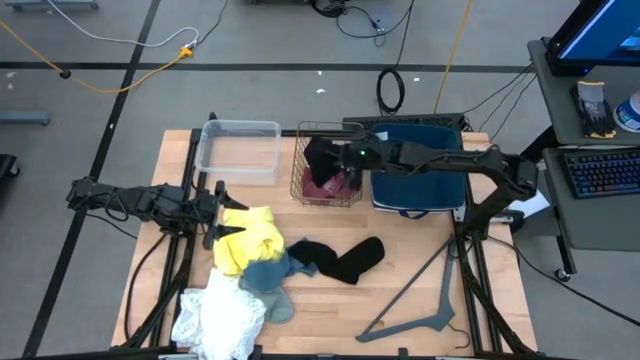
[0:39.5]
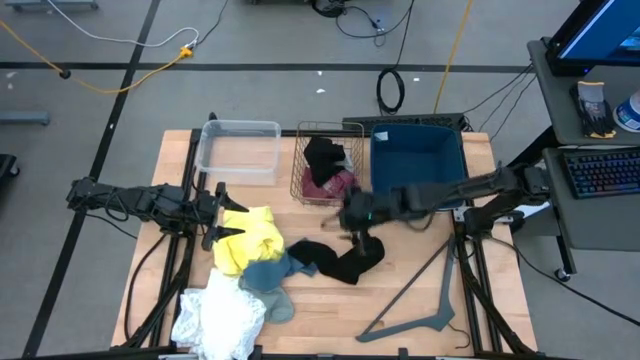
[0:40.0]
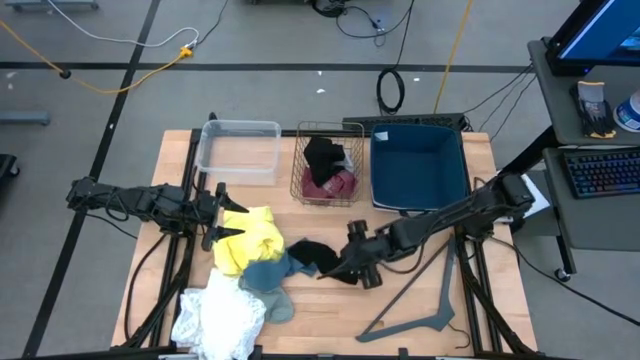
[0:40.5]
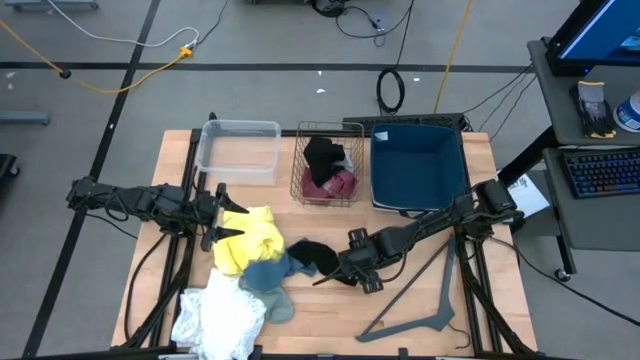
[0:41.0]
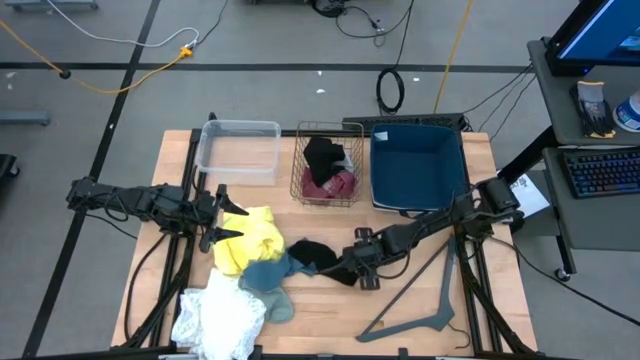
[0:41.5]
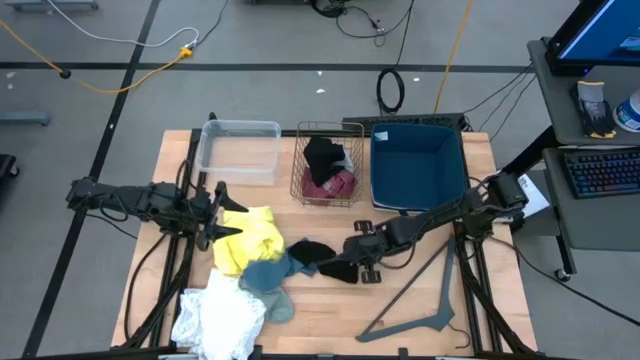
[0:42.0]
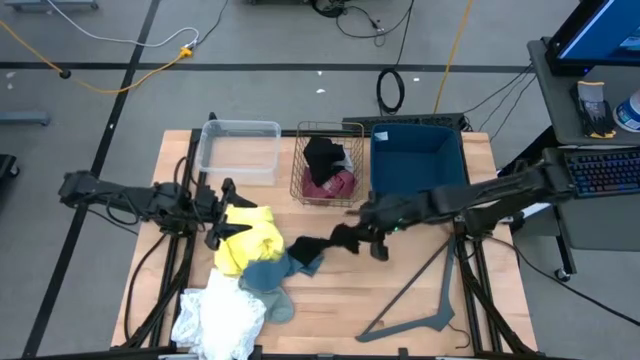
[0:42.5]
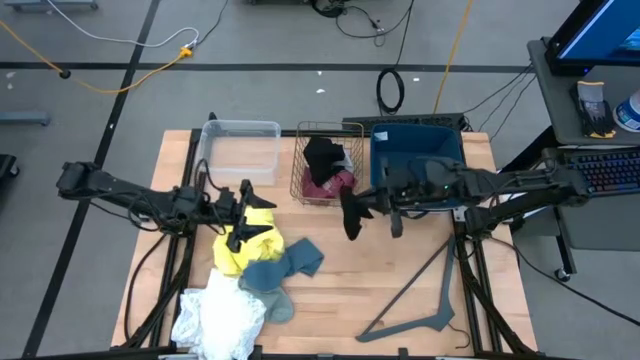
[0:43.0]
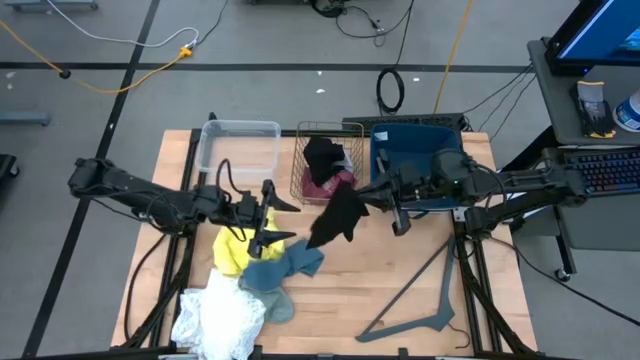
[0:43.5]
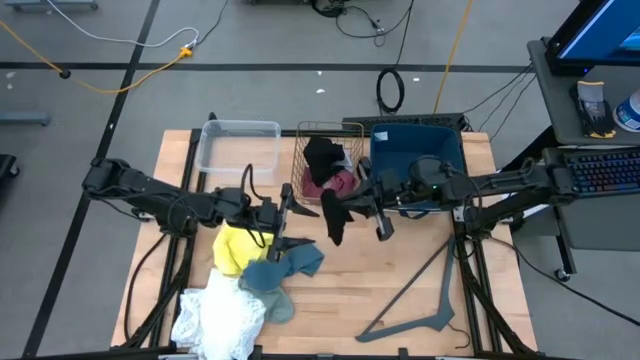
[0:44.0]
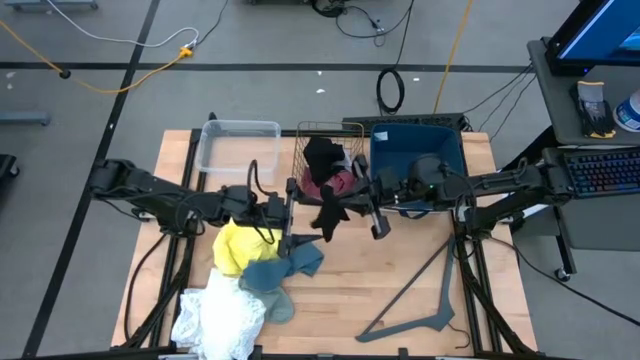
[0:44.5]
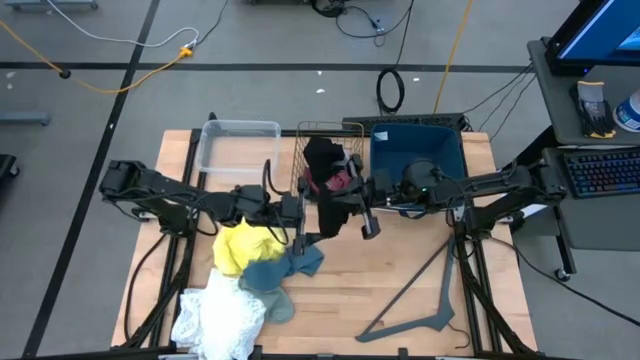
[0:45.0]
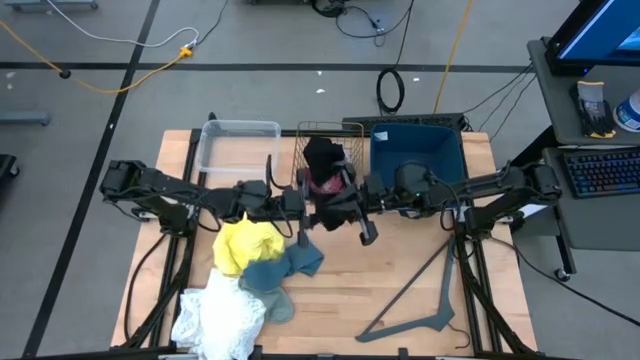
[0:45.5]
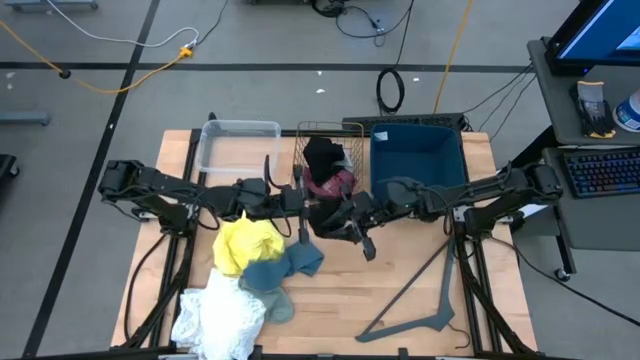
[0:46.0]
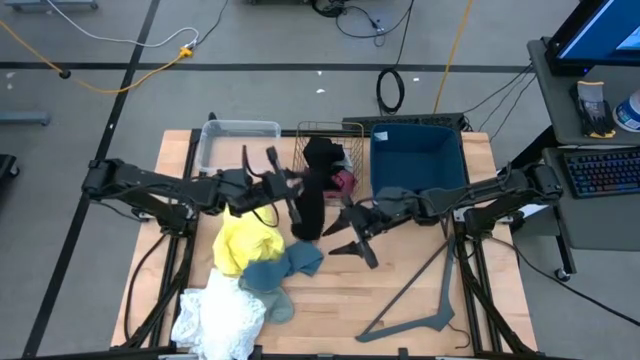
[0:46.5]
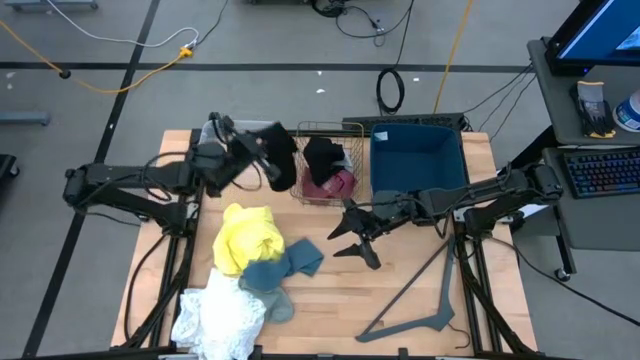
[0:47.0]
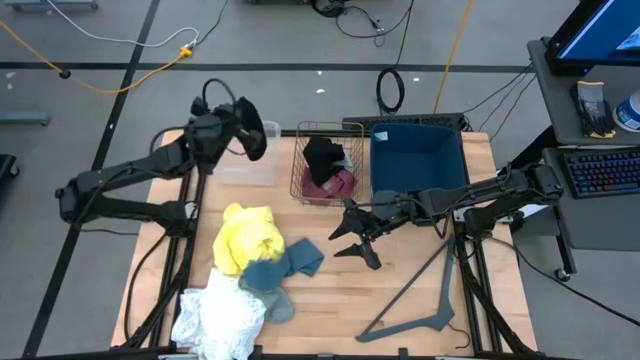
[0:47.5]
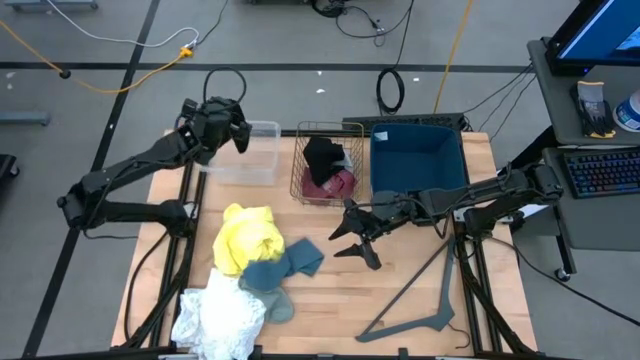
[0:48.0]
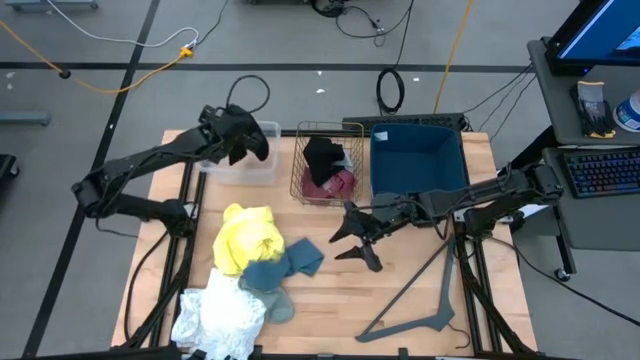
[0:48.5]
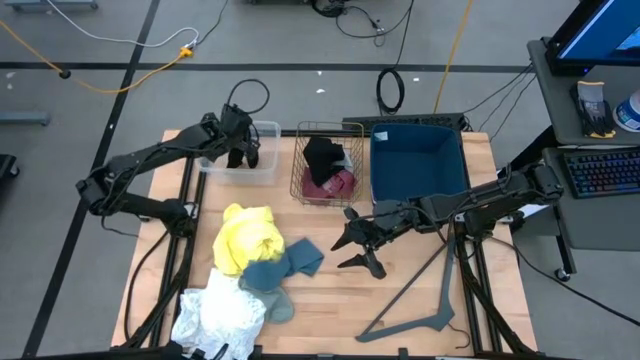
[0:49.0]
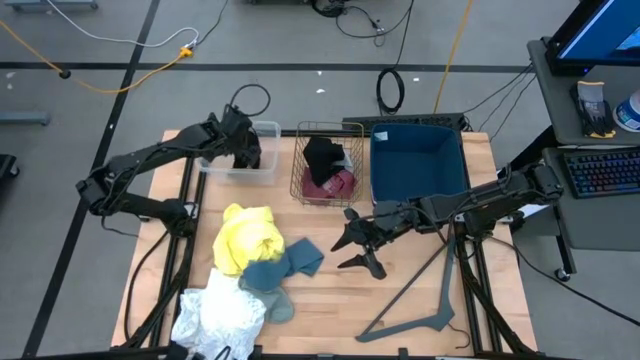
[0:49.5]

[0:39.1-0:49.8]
Task: Pick & Place Cloths
Put the black sock into the transparent bin

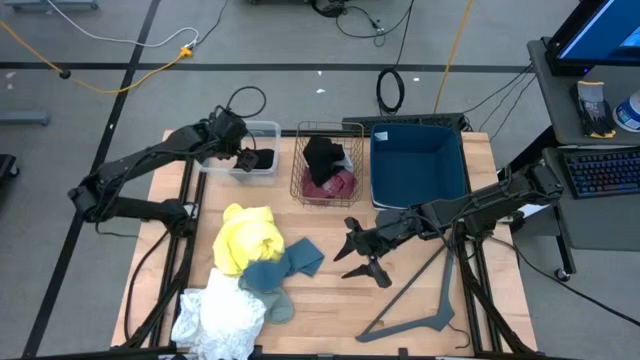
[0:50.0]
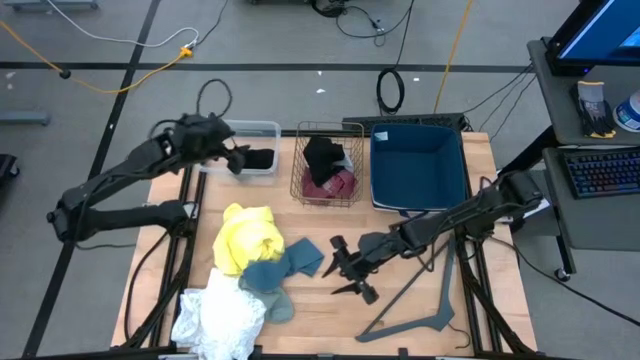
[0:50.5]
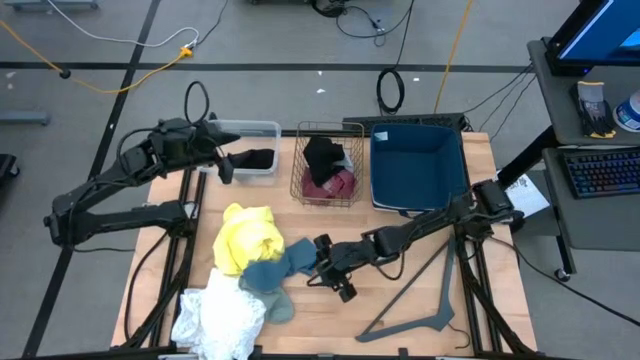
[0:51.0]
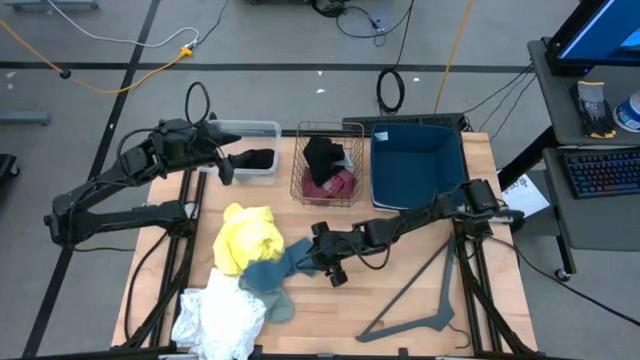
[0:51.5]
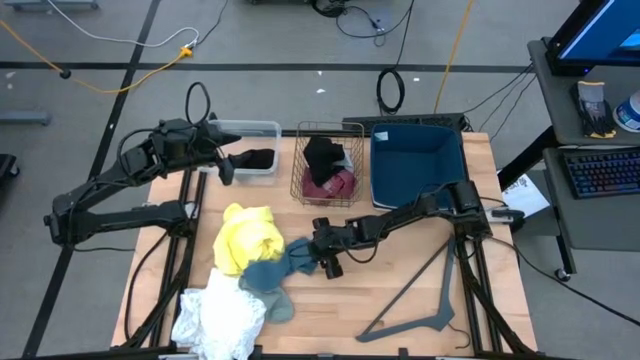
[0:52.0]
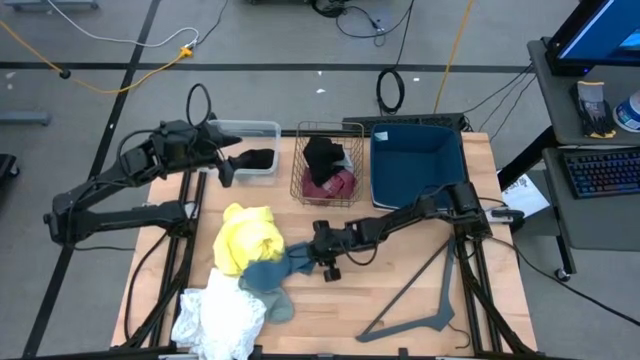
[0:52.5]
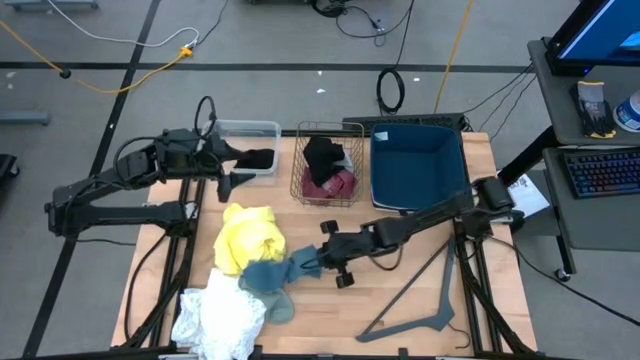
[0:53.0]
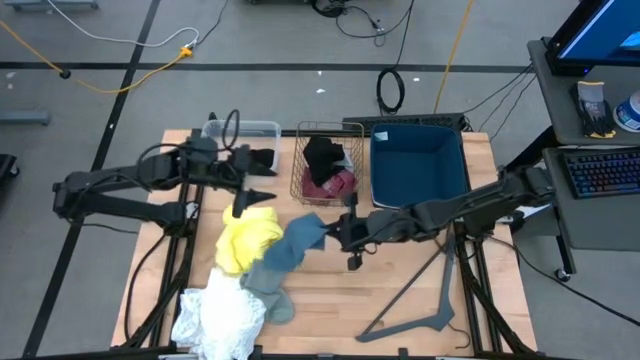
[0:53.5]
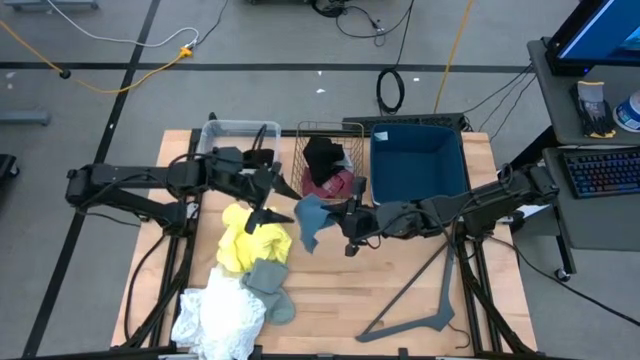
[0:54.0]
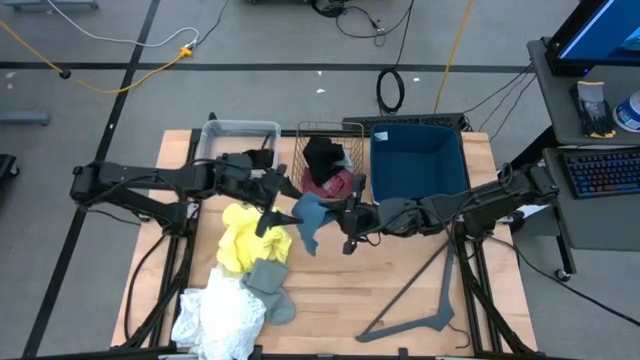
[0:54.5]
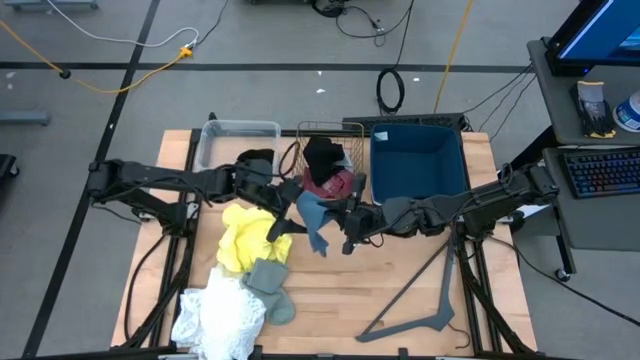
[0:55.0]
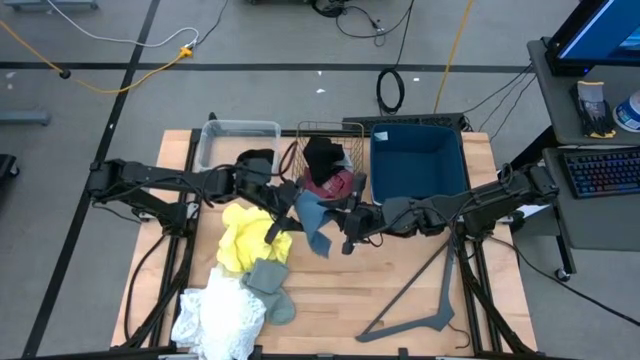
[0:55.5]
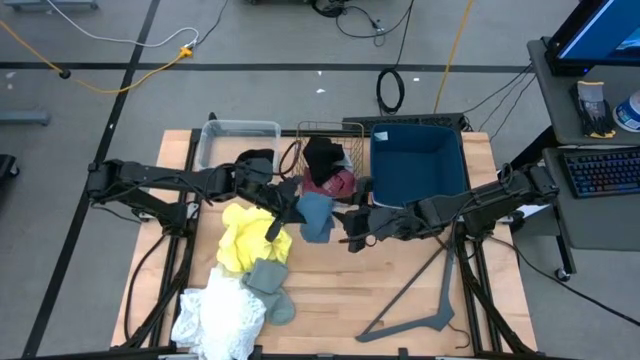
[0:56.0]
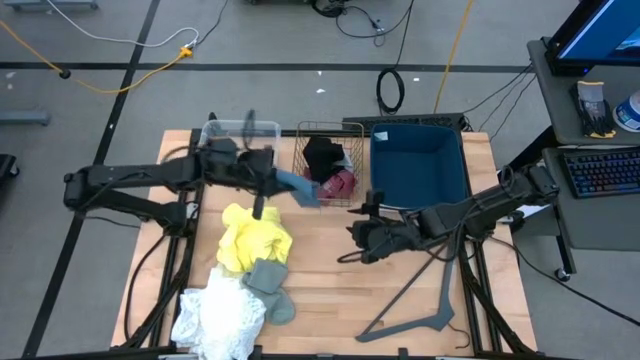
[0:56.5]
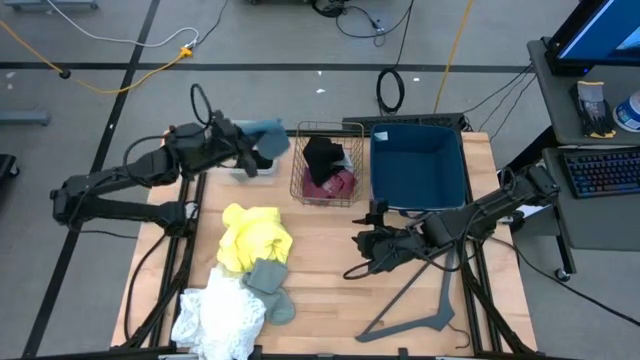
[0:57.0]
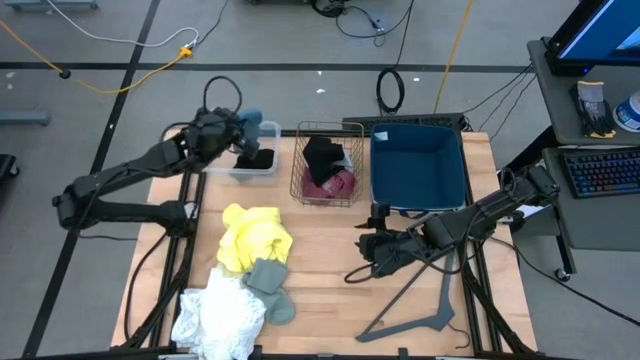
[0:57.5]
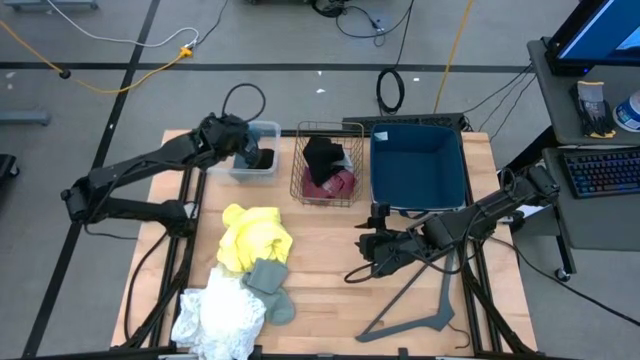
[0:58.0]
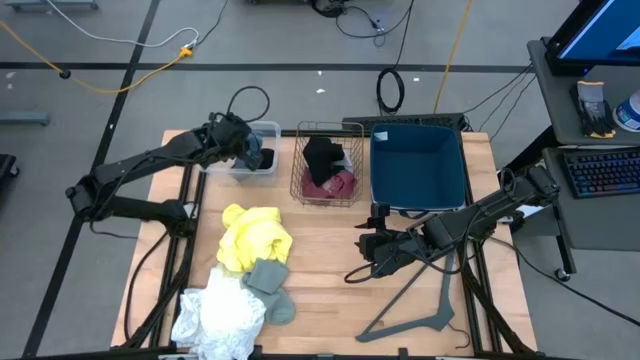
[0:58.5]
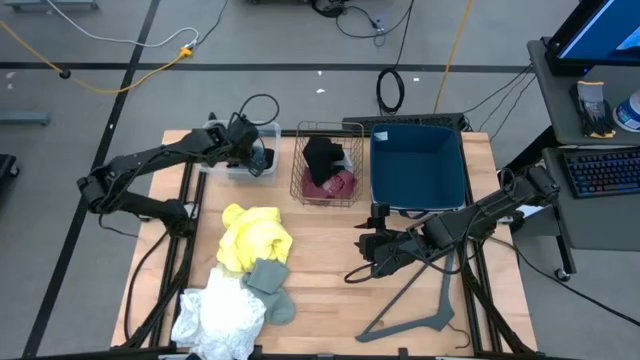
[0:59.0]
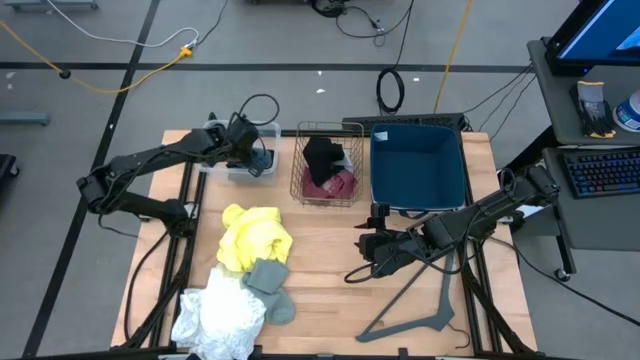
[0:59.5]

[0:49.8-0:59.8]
Put the light blue sock into the transparent bin

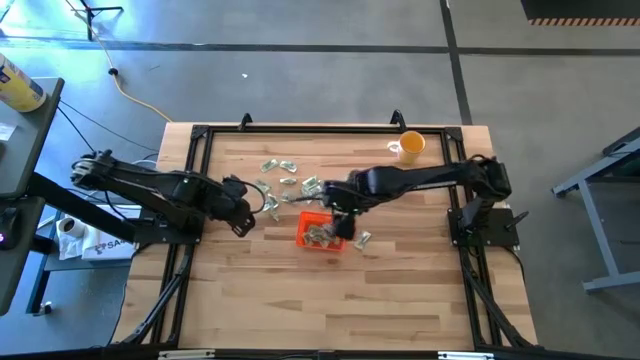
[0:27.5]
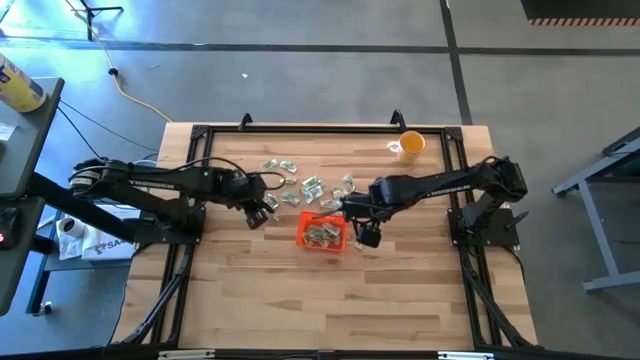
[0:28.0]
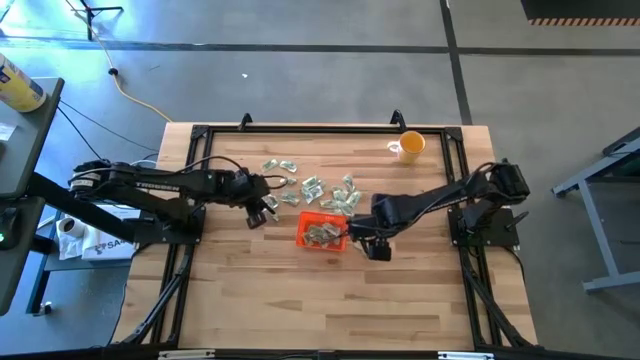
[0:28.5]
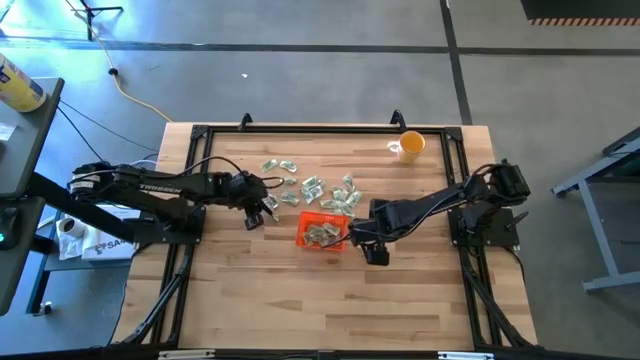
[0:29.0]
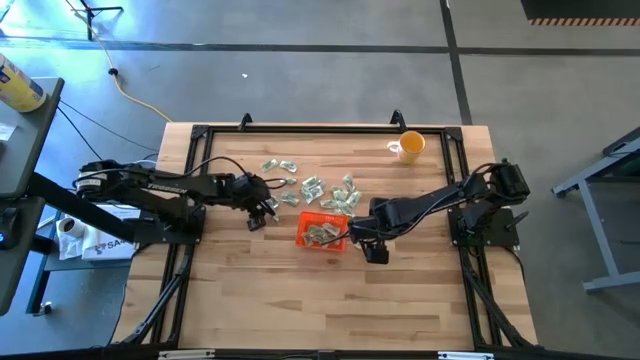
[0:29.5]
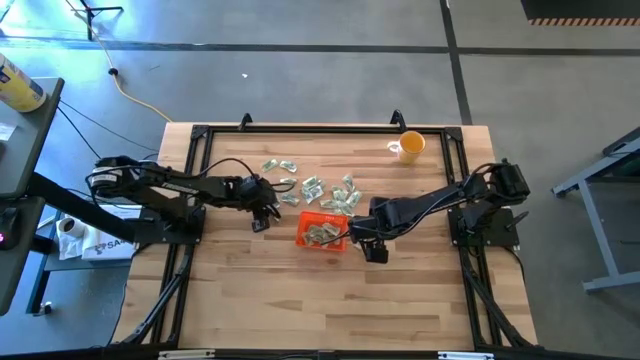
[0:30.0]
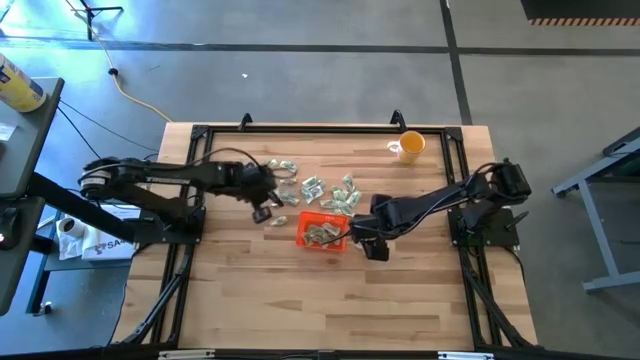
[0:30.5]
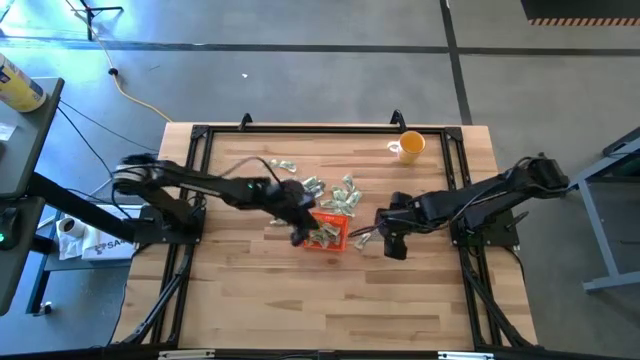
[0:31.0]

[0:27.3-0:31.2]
Task: Pick and place Stevia / Truvia into bins
Put the stevia packet into the orange bin
